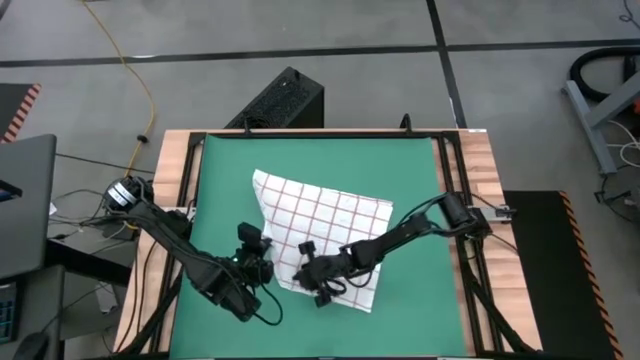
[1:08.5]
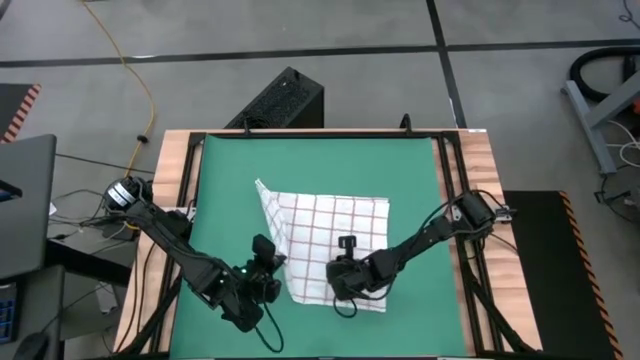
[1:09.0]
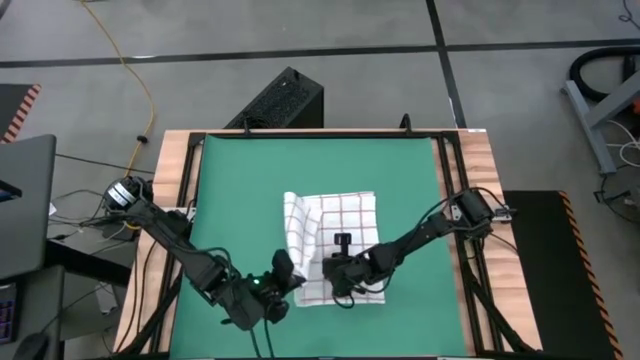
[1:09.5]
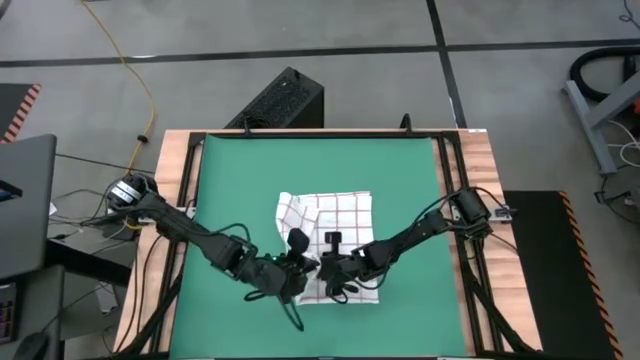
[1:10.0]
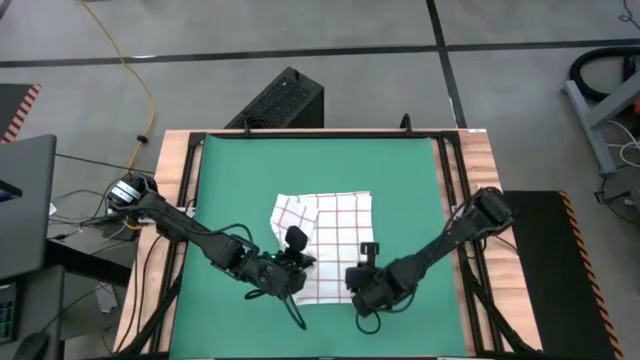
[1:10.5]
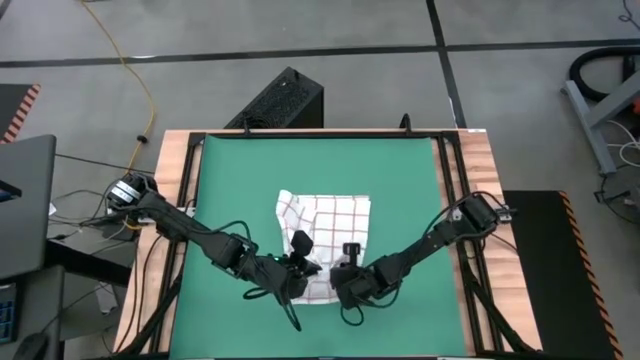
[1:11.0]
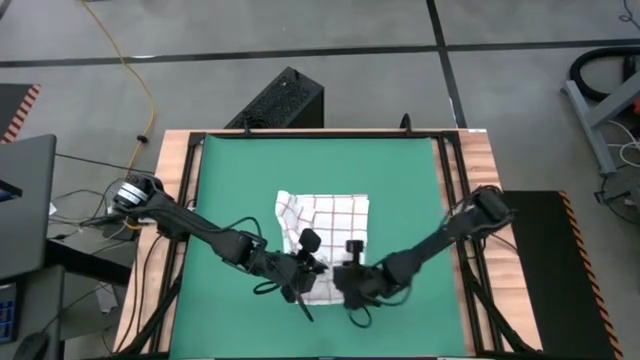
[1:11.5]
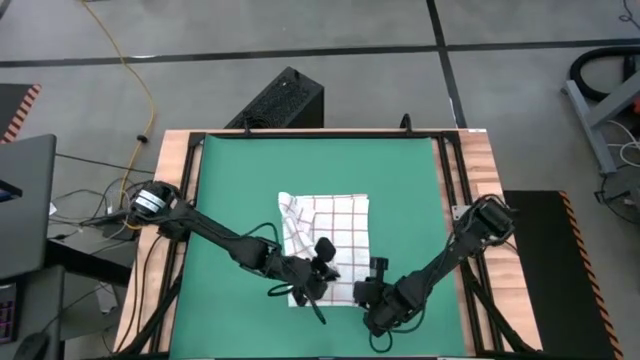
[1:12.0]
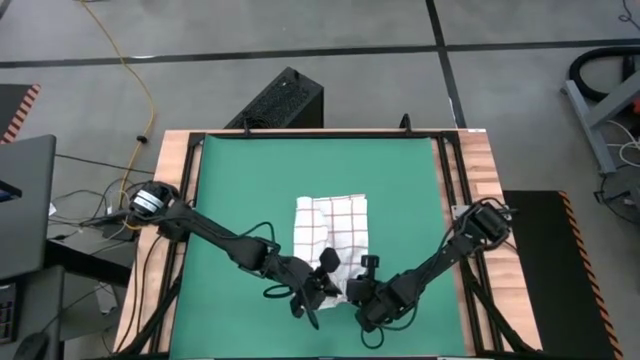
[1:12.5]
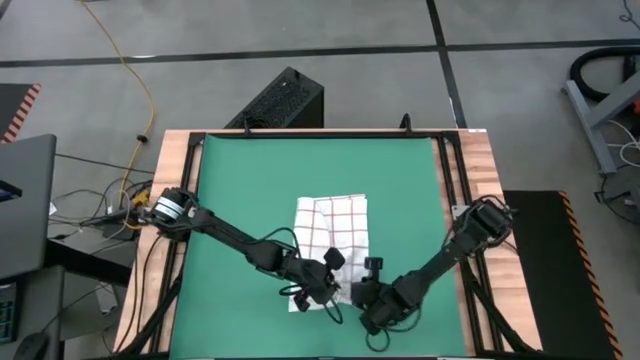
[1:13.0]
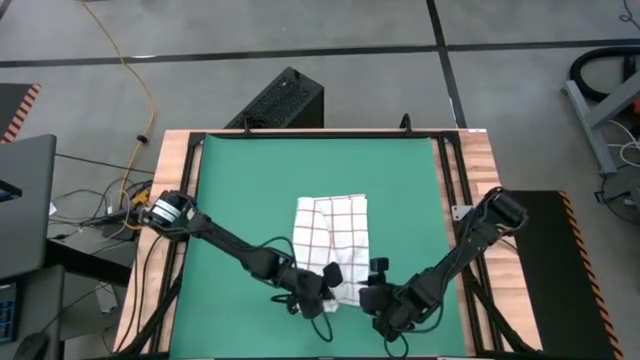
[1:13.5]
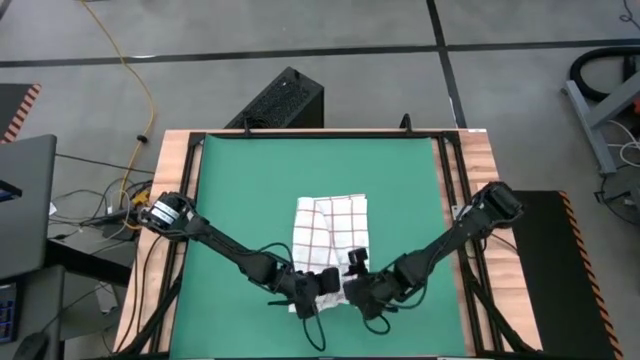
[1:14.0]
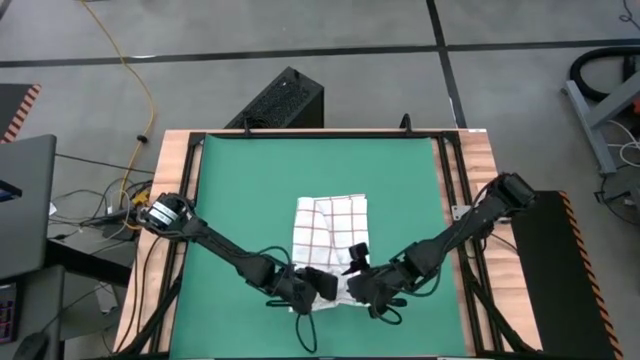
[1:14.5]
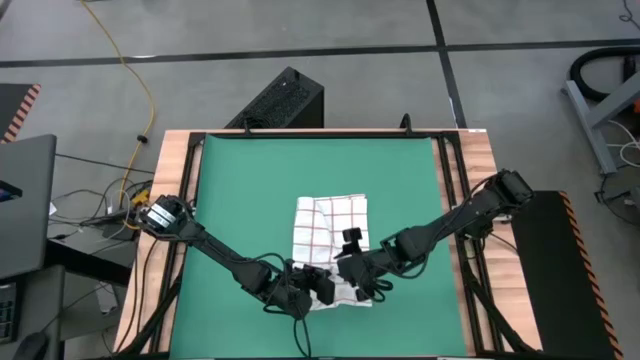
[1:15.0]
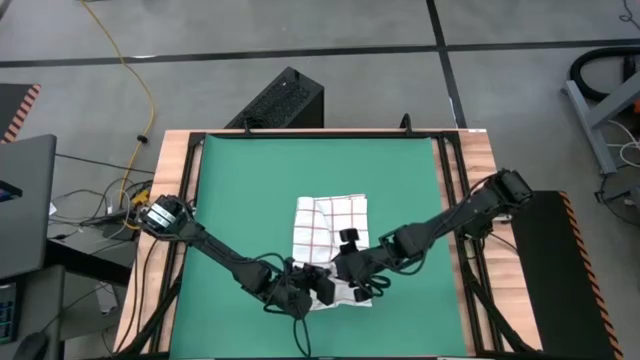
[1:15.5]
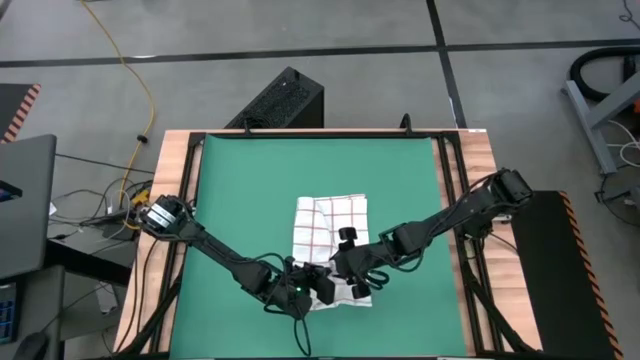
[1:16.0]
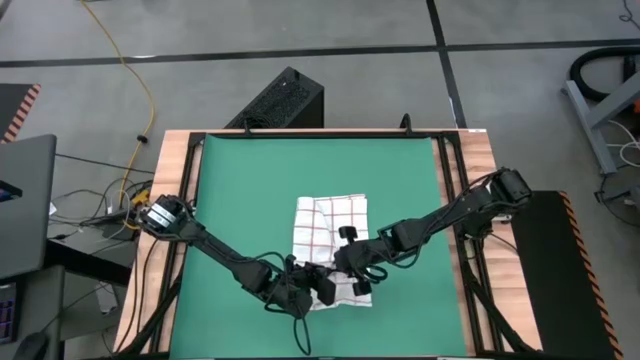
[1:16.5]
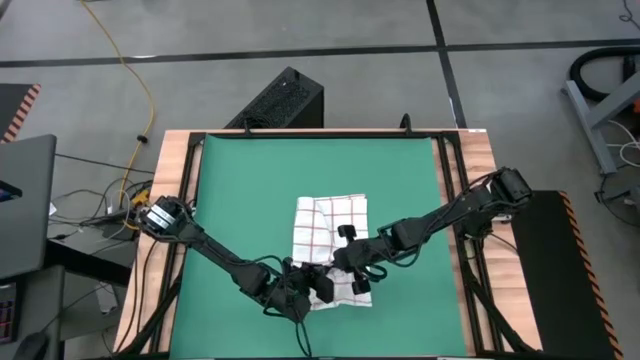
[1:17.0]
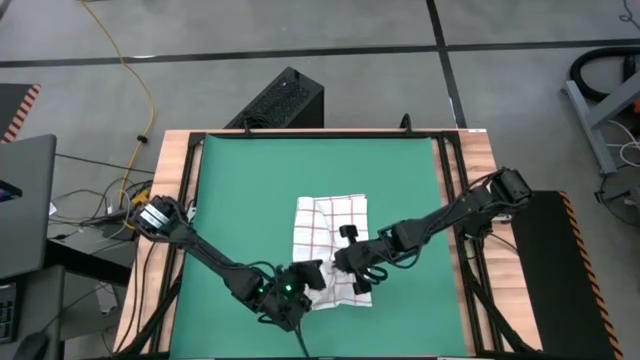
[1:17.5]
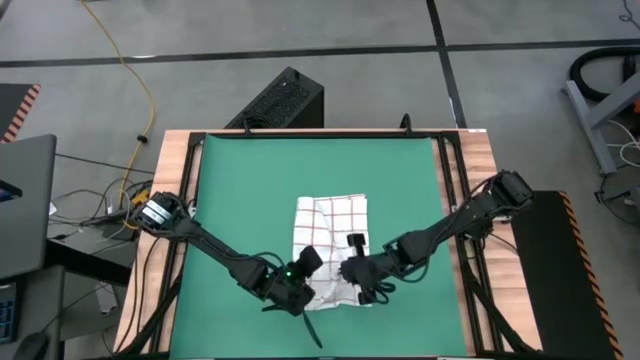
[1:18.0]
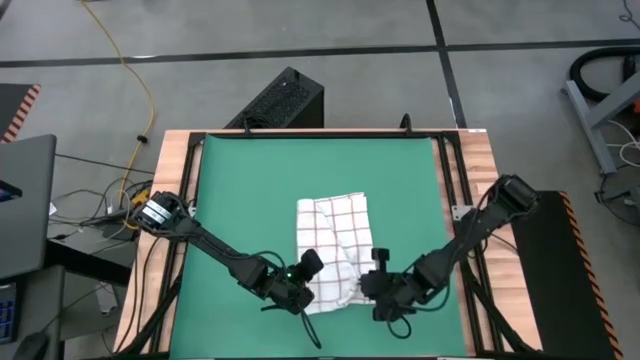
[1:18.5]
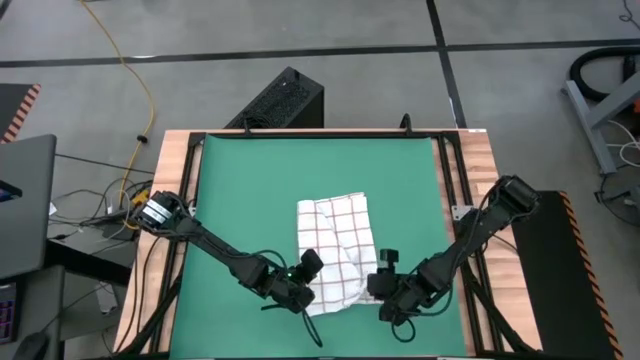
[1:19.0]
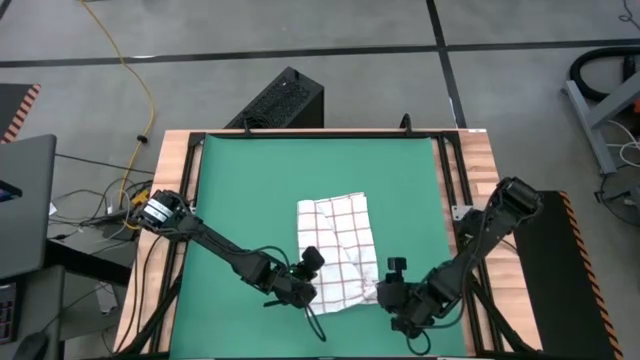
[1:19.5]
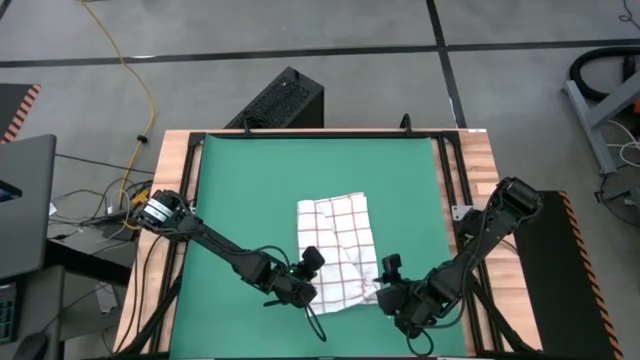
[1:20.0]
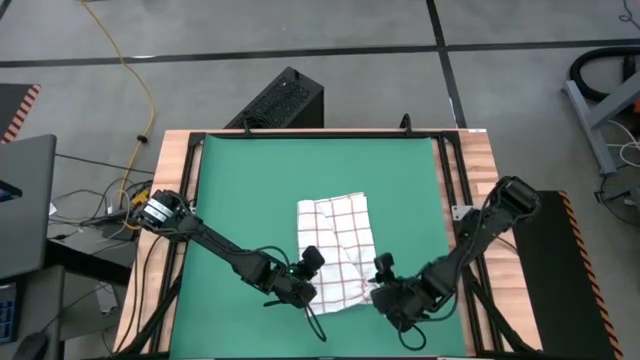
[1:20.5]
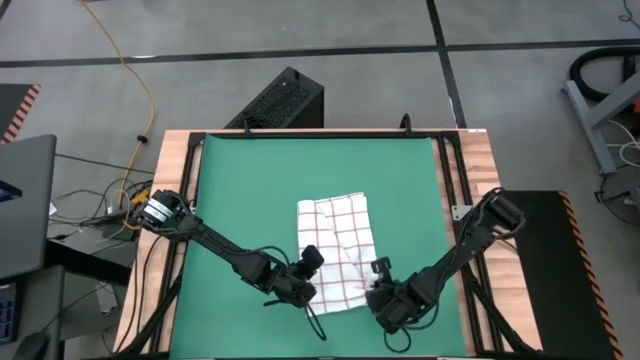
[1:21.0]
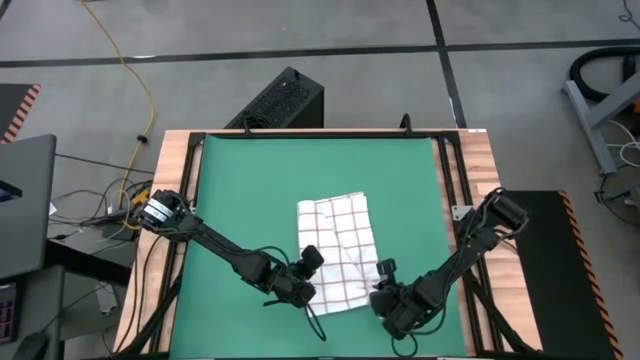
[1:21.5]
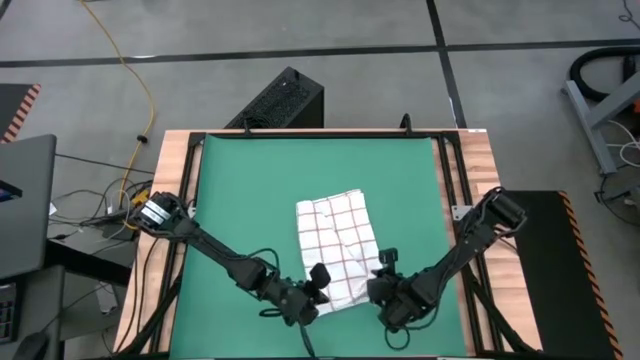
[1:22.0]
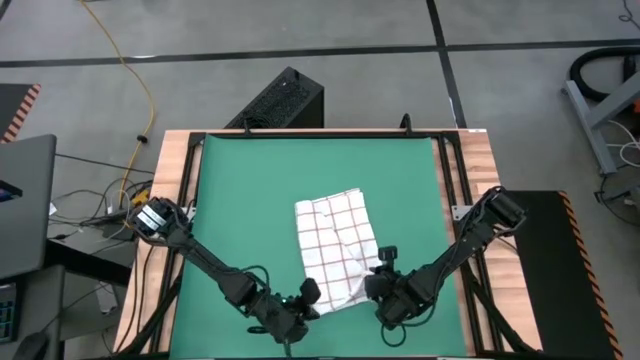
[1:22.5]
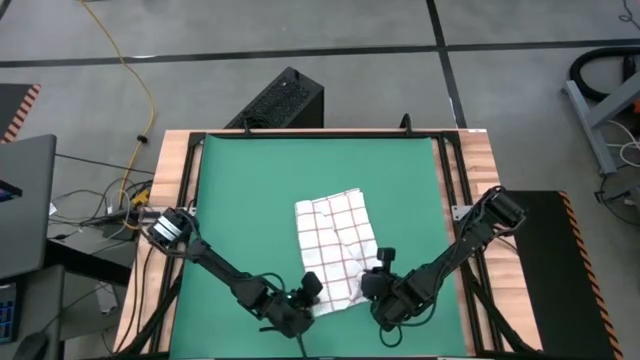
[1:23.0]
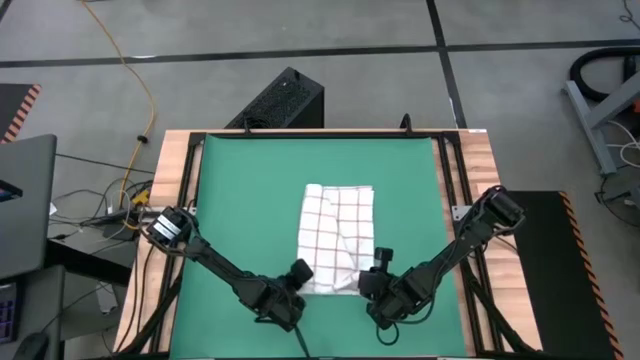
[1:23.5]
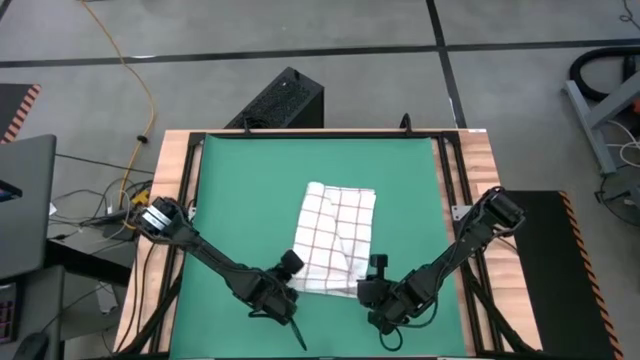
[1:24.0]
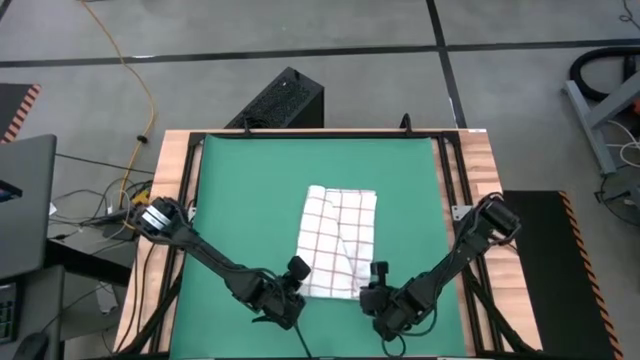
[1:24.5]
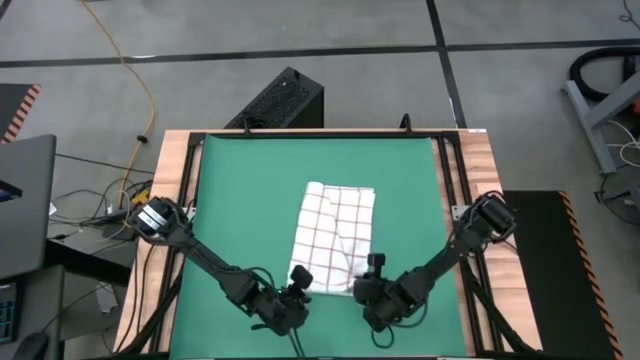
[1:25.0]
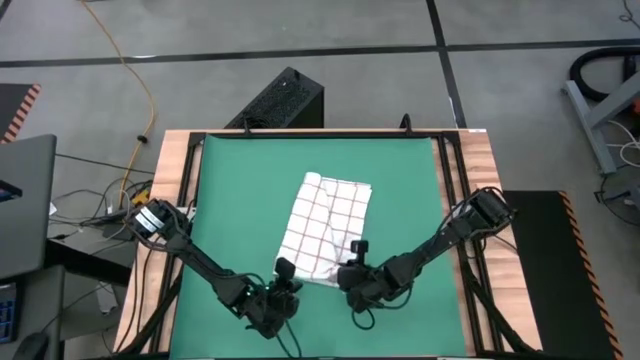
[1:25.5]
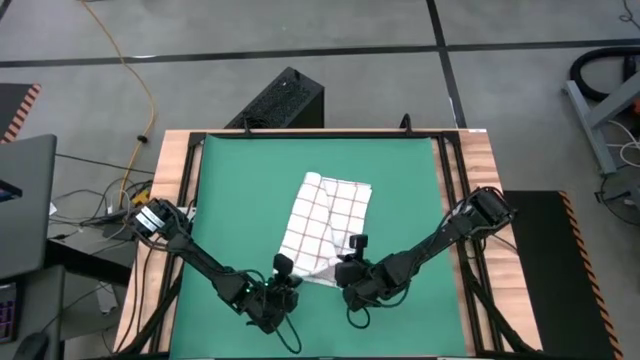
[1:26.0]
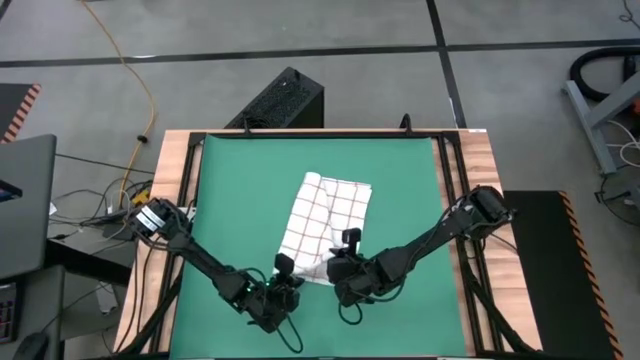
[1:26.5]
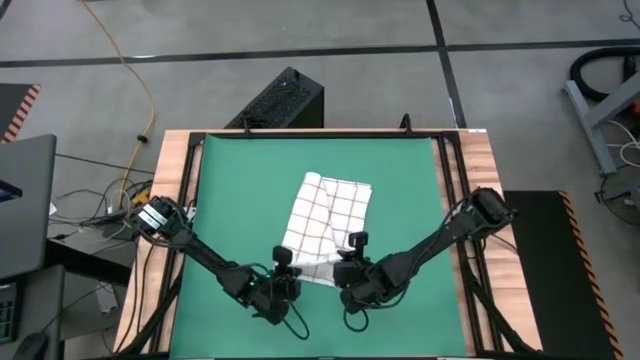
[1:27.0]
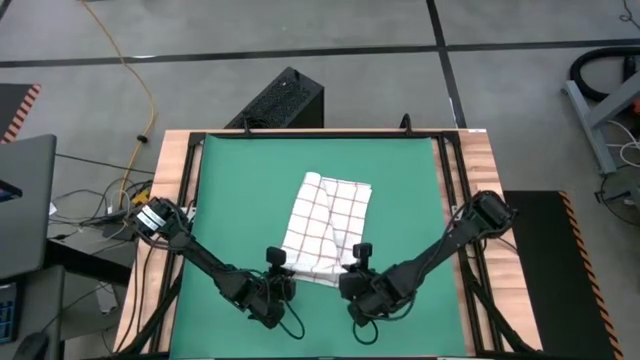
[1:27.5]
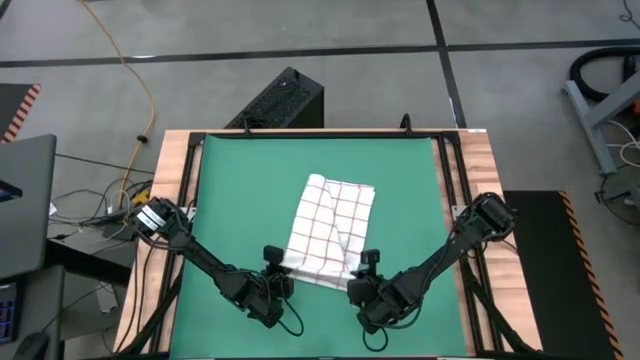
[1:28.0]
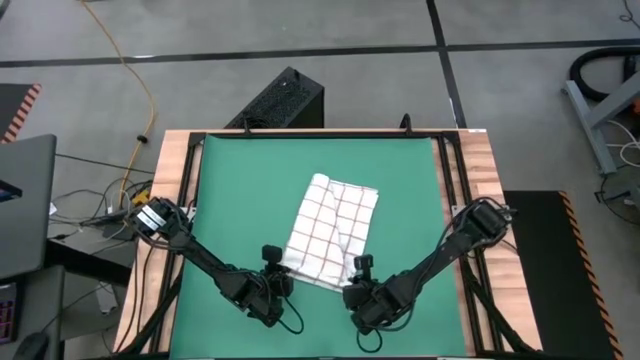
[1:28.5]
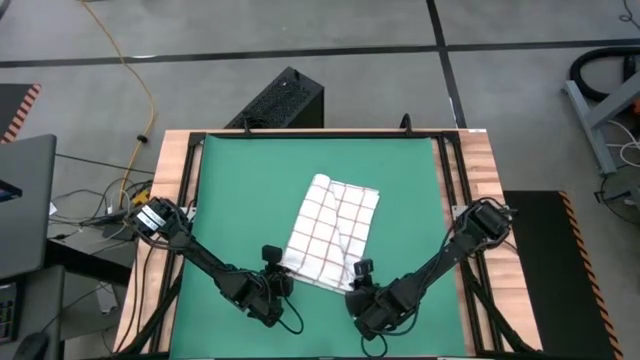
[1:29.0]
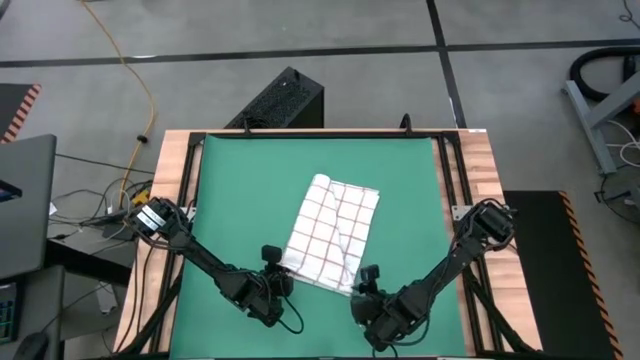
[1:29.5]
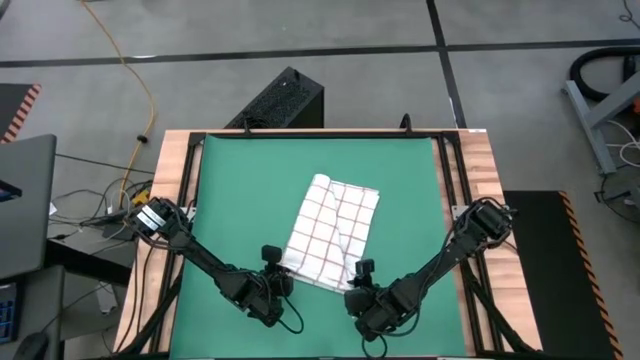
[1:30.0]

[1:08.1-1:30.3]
Task: Roll towel into tight, uniform cylinder
Fold the white towel
